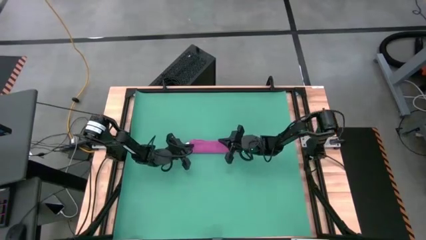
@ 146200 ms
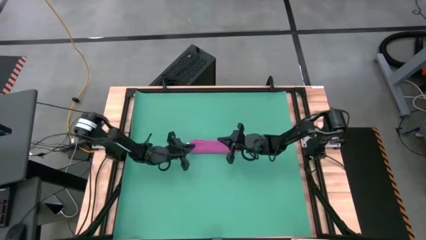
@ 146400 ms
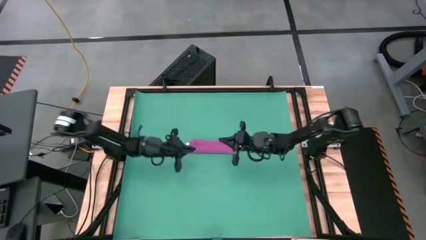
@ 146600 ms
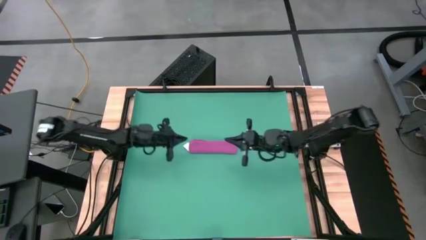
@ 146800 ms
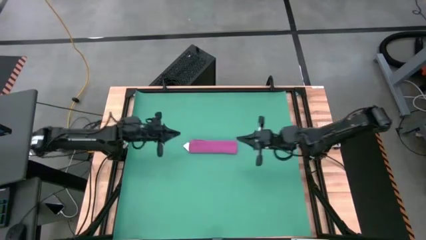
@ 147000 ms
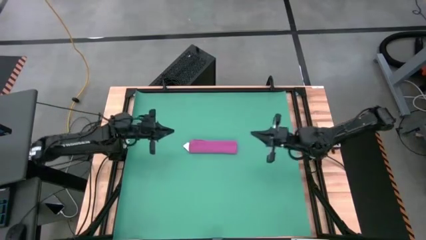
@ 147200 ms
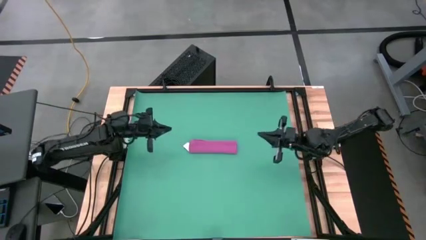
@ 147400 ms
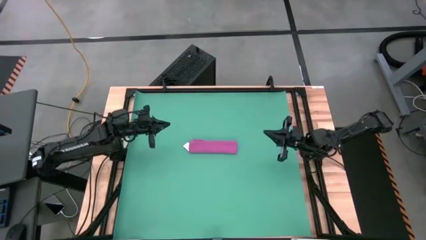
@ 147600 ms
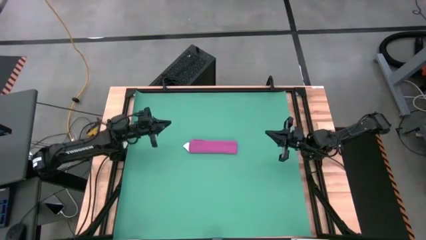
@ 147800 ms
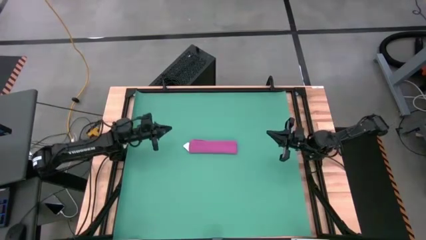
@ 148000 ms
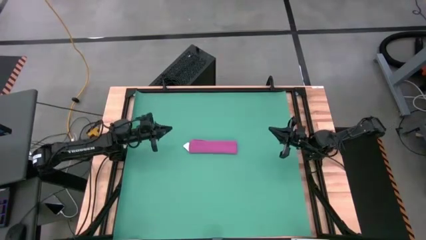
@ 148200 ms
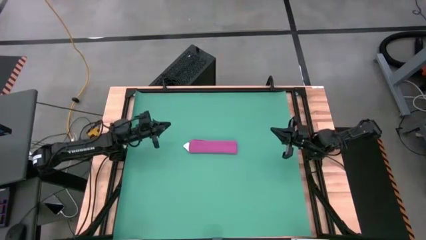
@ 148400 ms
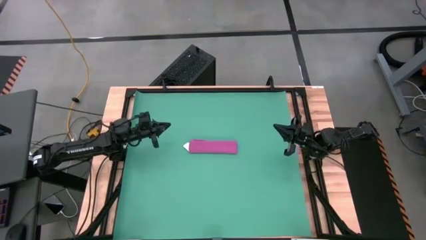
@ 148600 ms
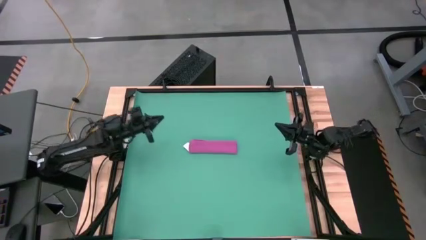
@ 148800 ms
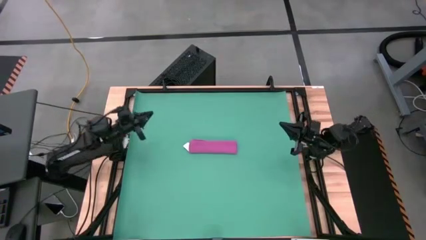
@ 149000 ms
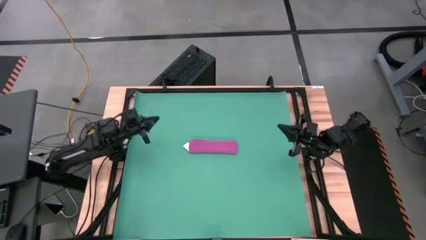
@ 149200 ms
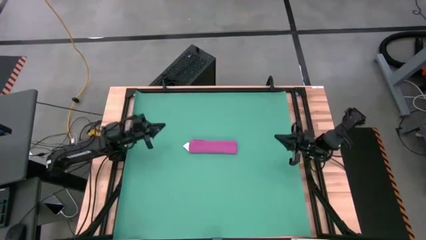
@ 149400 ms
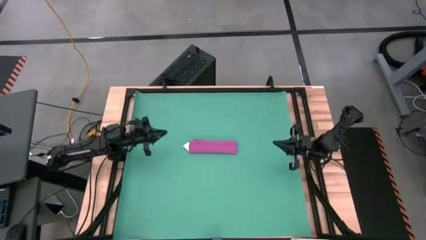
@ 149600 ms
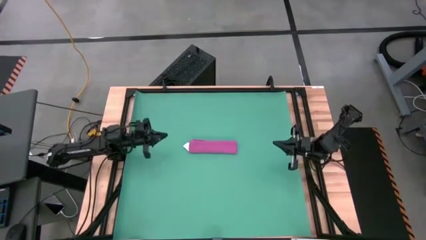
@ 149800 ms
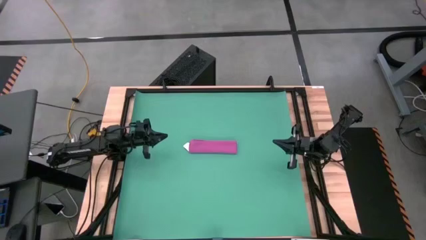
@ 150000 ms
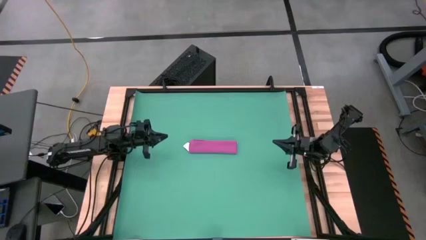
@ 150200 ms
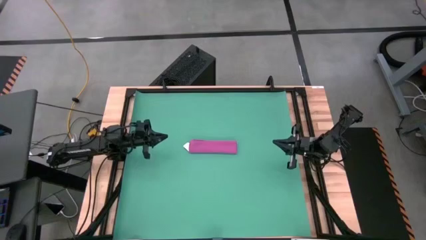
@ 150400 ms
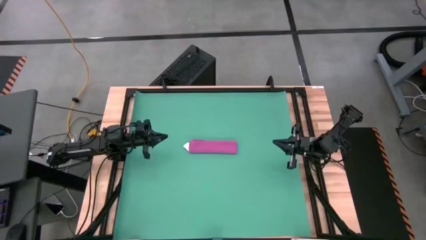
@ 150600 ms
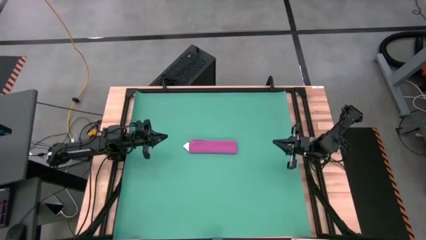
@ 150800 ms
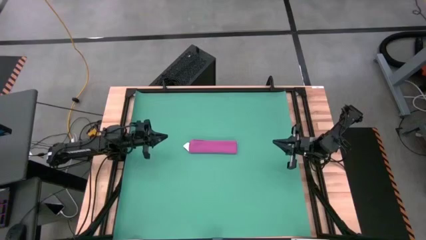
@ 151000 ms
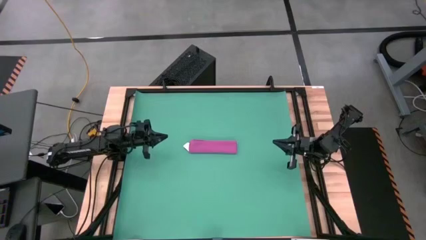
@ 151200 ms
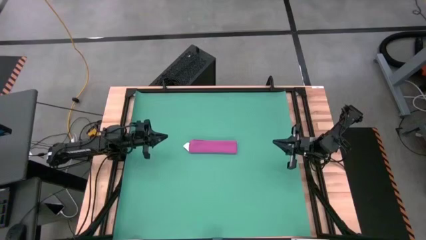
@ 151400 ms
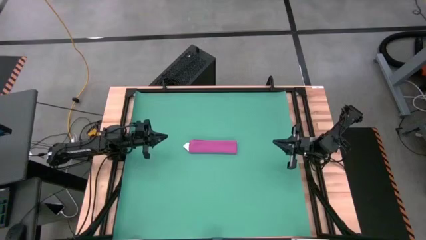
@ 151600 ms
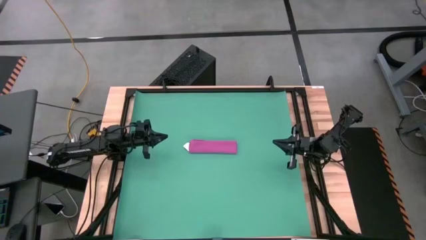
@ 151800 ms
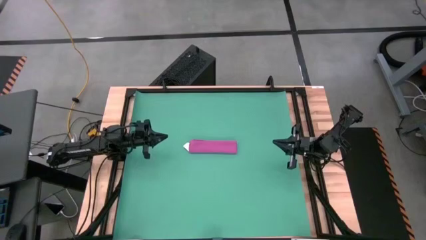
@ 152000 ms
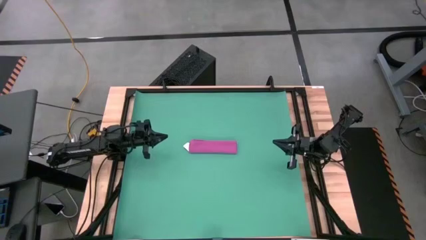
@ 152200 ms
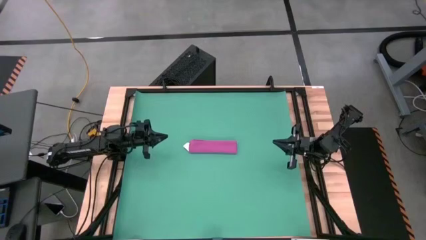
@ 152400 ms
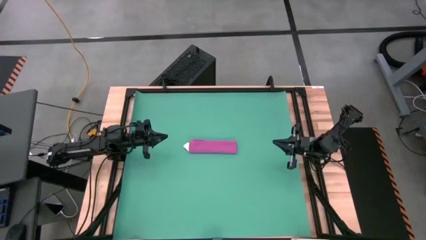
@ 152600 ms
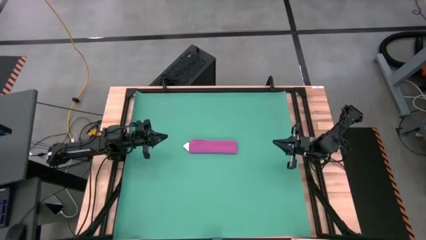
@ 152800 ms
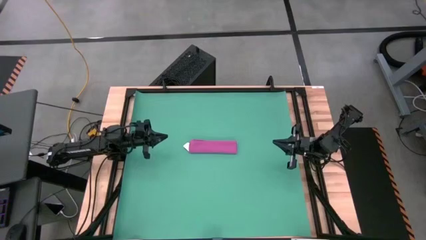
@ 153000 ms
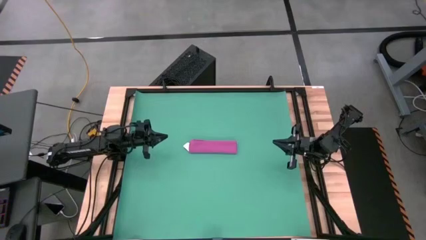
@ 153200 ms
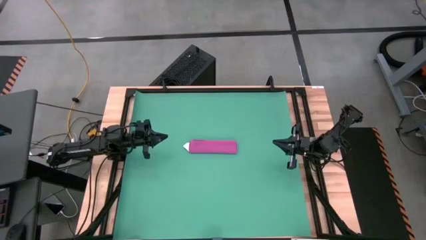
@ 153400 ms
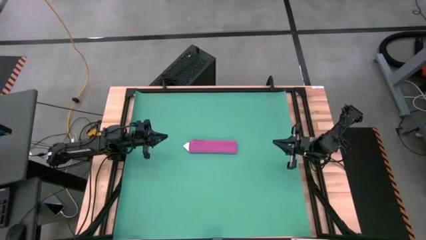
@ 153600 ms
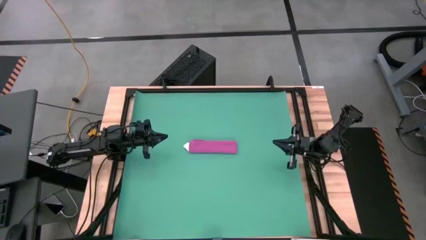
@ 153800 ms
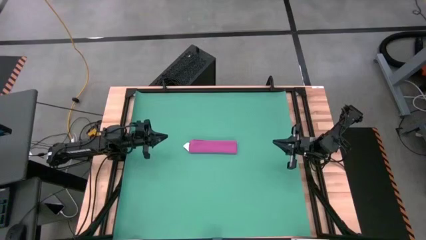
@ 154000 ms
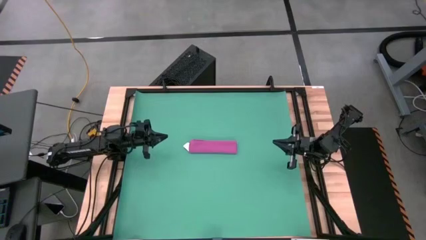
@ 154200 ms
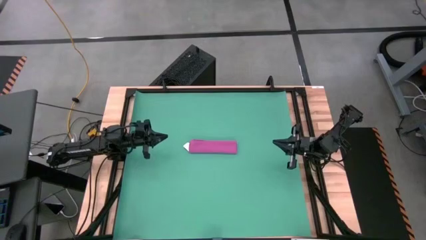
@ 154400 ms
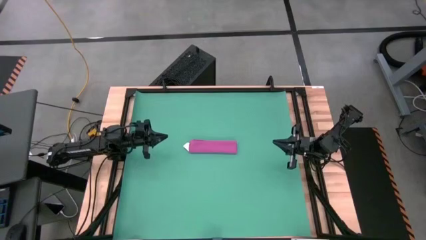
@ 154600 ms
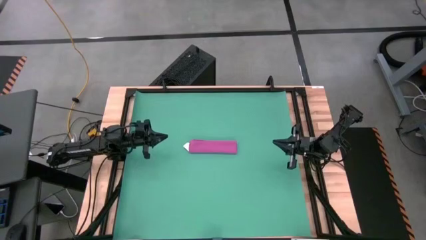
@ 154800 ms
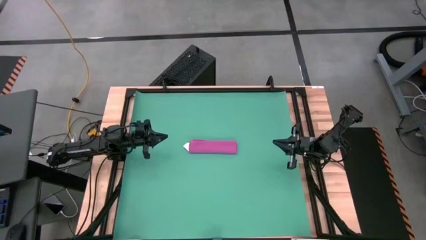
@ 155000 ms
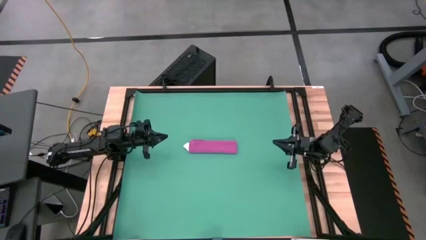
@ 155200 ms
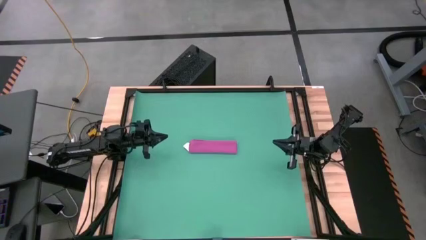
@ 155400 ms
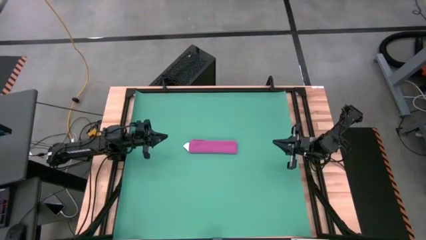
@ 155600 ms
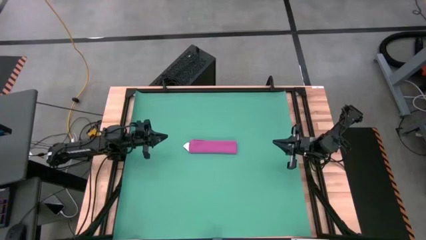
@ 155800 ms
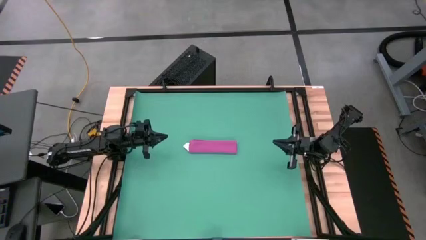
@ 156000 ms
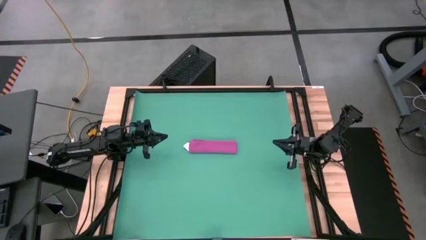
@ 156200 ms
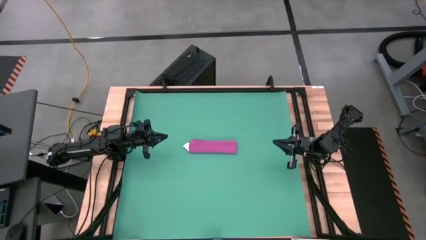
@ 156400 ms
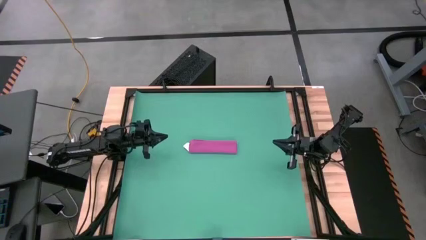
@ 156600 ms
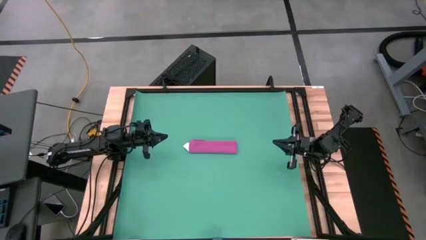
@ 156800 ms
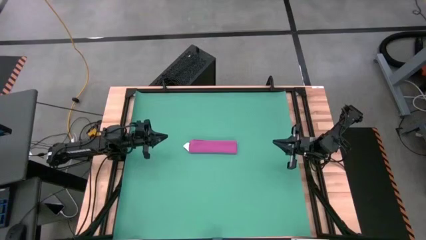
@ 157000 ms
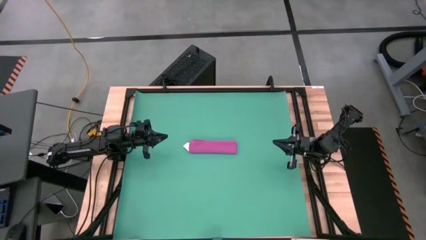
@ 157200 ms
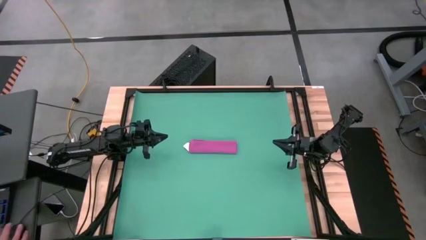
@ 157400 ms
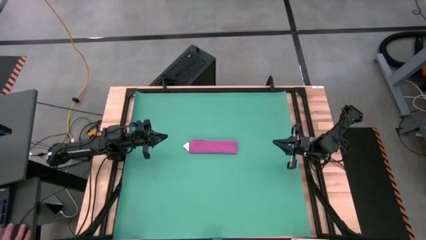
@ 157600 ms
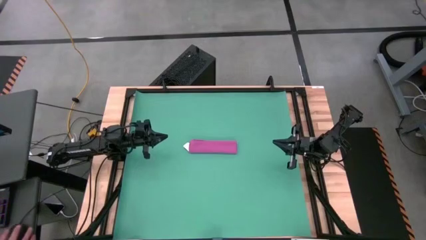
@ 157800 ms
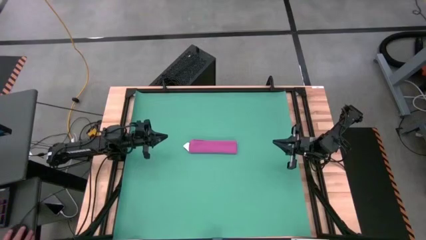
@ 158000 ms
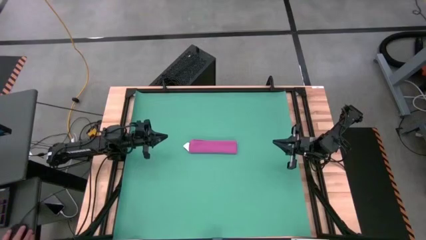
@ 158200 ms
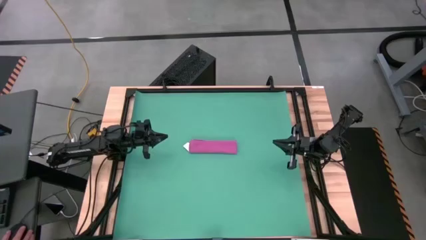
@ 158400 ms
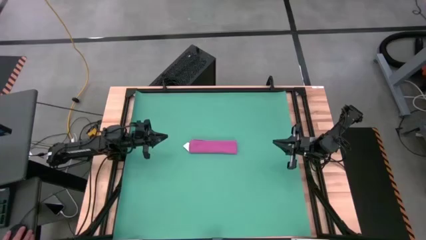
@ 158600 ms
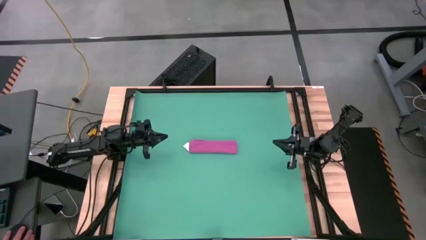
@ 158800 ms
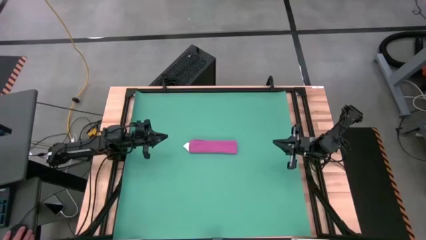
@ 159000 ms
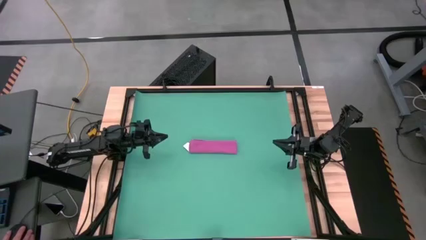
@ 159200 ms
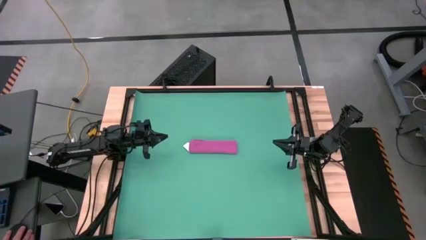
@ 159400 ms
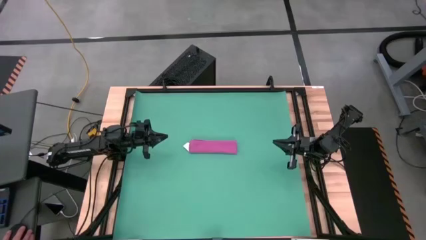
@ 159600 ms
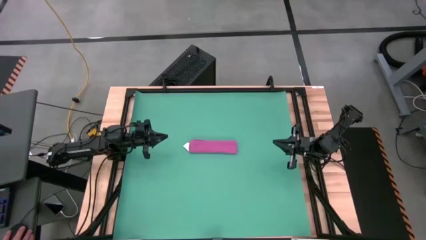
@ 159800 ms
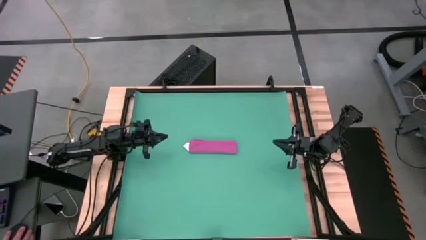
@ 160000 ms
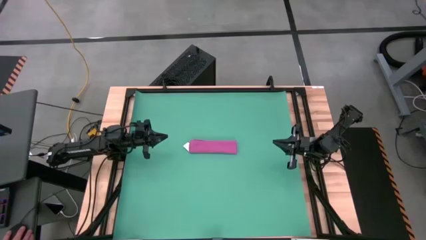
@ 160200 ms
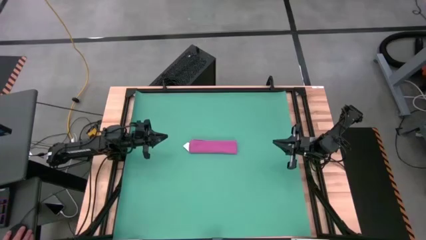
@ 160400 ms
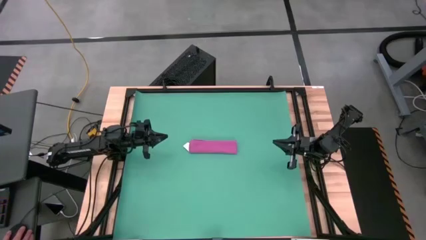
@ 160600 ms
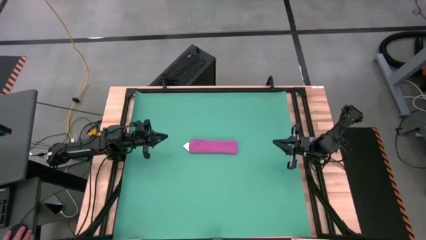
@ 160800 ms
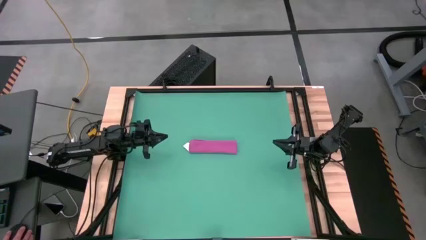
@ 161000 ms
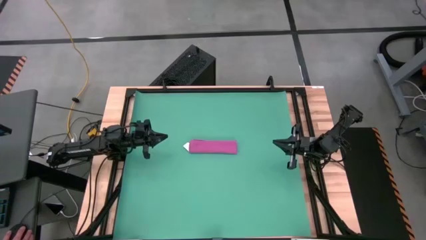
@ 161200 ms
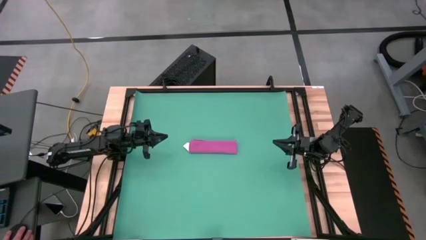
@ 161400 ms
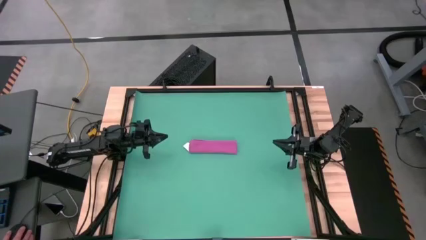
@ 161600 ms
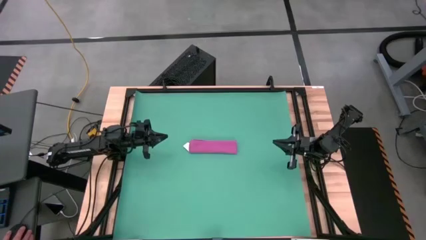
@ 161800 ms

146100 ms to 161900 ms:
Task: Roll towel
Return to Home Position

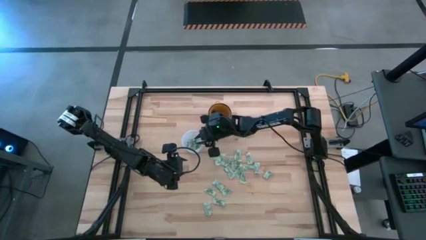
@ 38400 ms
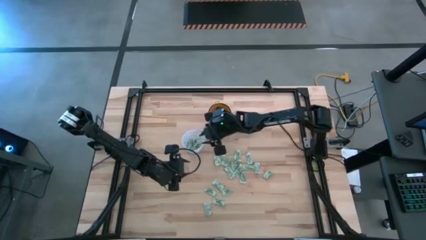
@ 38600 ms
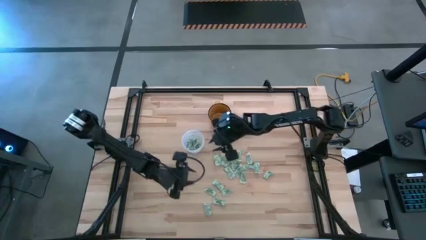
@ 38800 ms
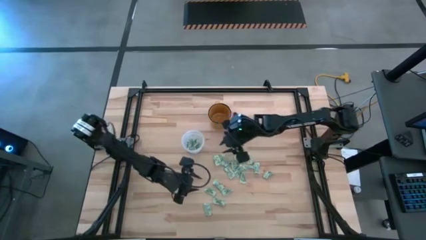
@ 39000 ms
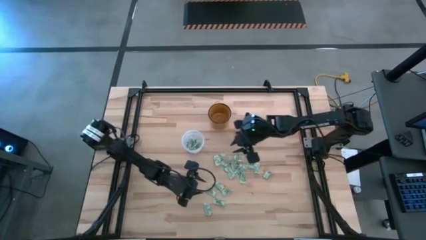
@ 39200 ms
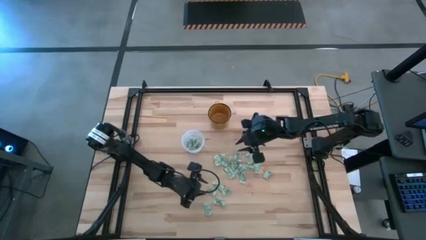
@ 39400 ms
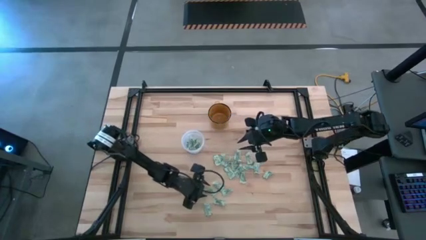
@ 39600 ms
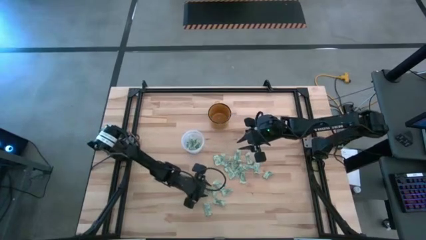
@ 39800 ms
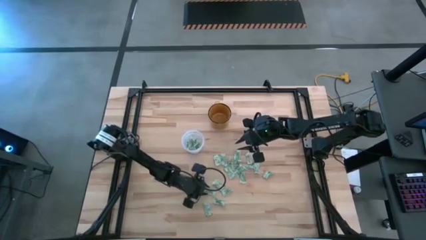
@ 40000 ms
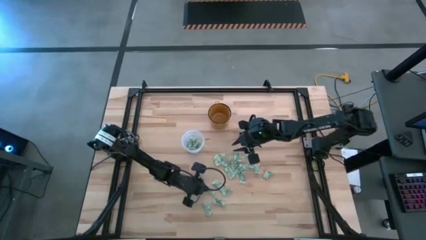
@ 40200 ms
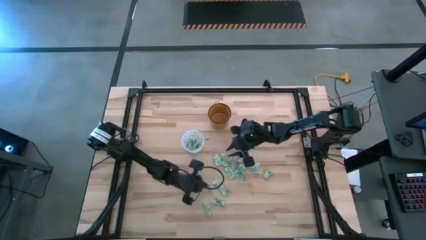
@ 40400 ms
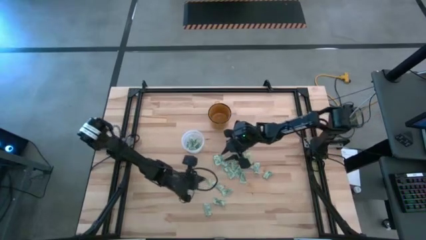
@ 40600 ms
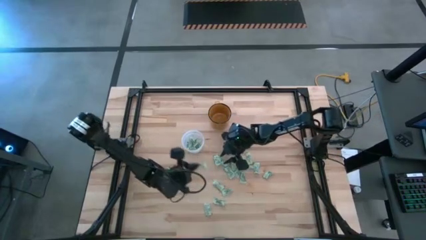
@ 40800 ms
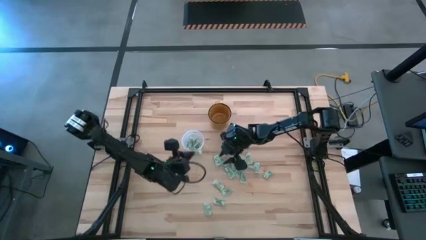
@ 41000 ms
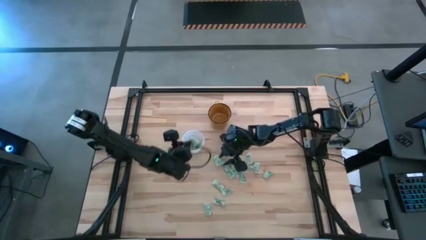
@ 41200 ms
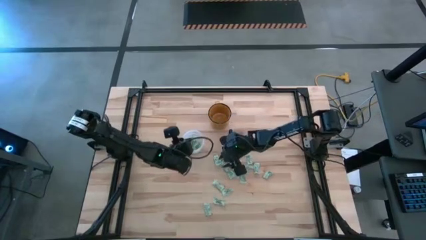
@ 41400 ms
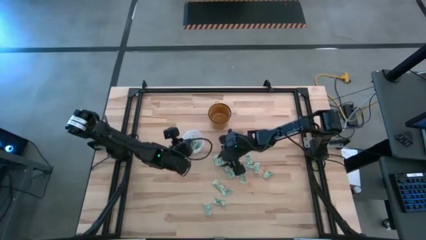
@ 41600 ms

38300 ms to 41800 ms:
Task: Pick and place Stevia / Truvia into bins
Put the stevia packet into the transparent bin
